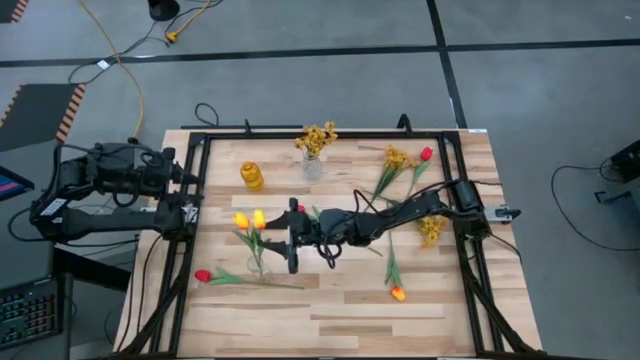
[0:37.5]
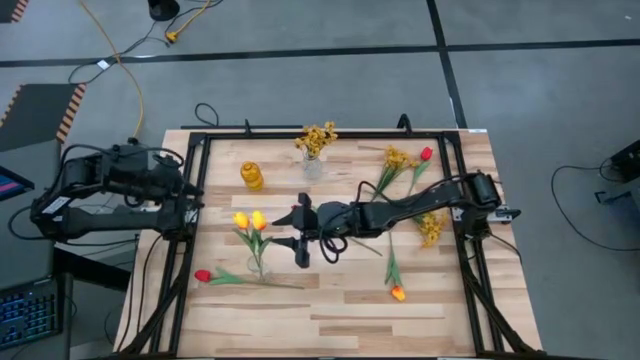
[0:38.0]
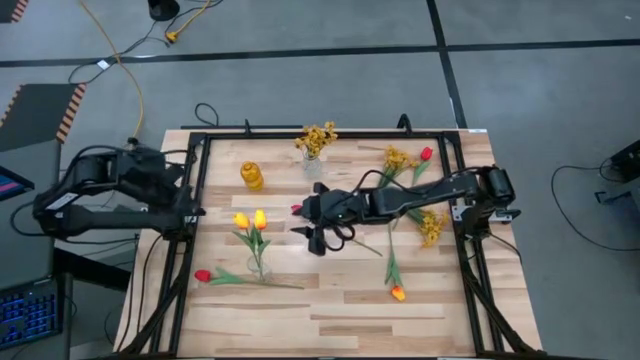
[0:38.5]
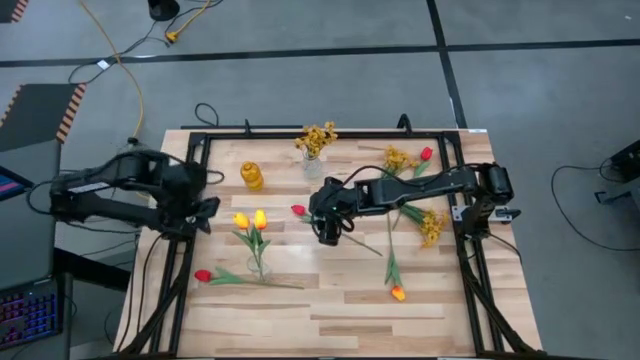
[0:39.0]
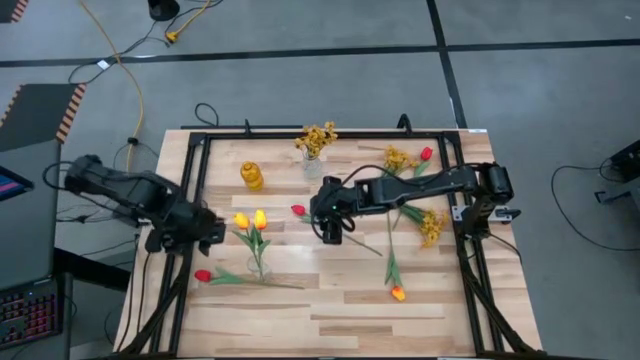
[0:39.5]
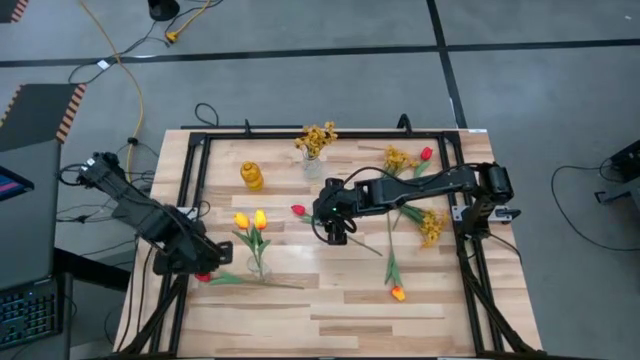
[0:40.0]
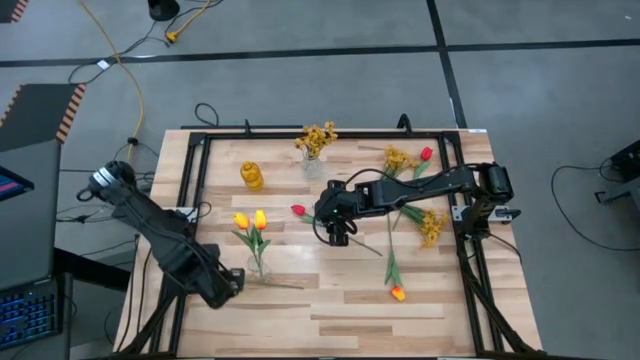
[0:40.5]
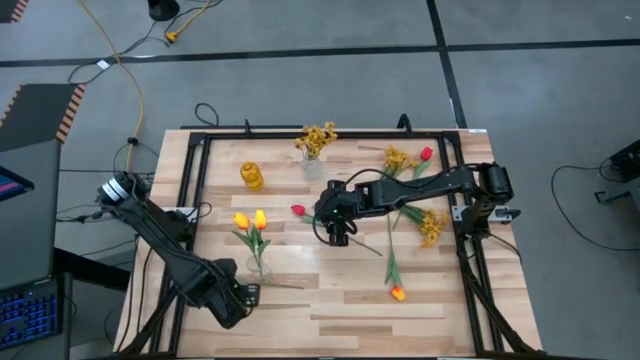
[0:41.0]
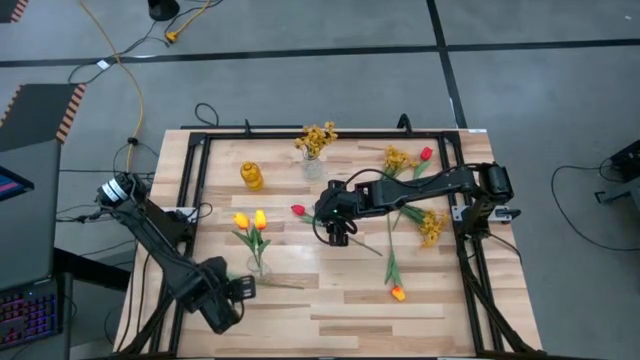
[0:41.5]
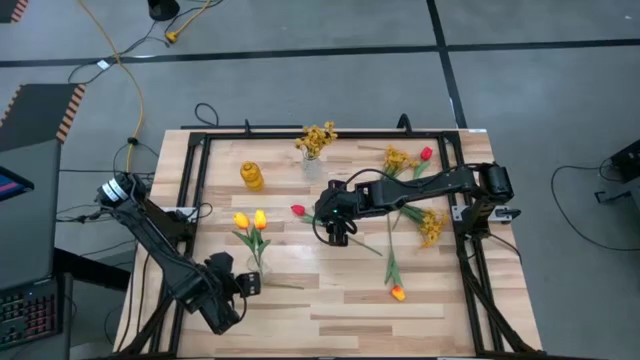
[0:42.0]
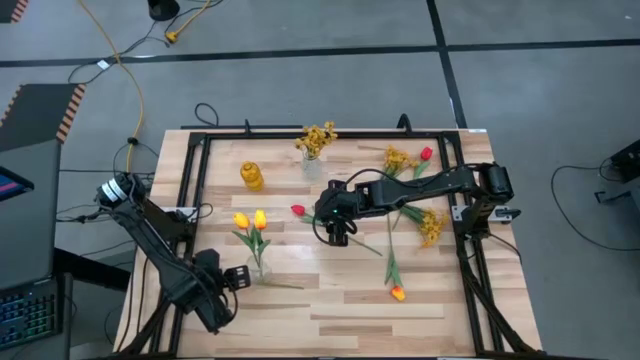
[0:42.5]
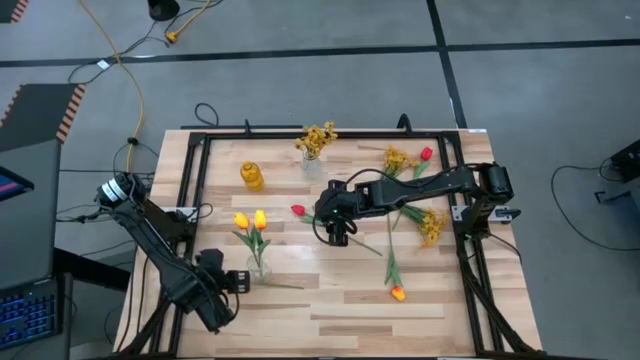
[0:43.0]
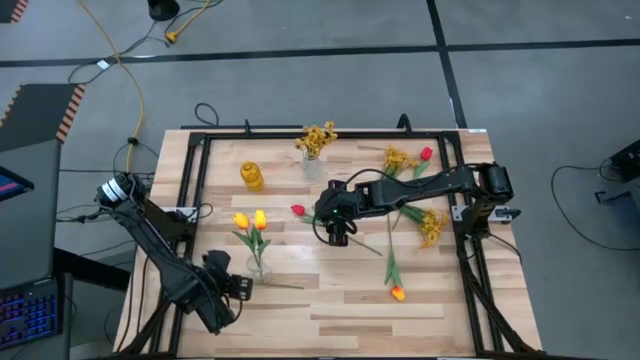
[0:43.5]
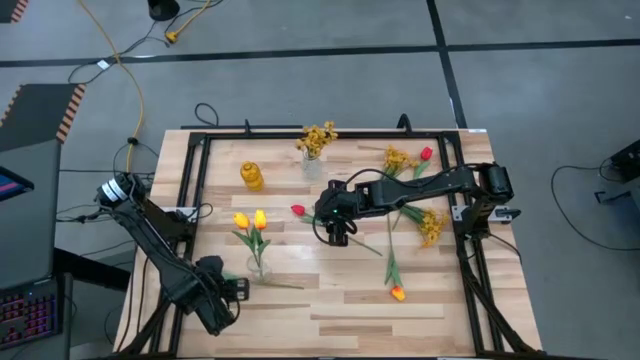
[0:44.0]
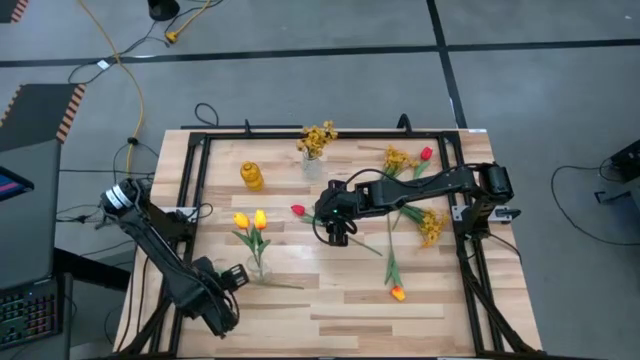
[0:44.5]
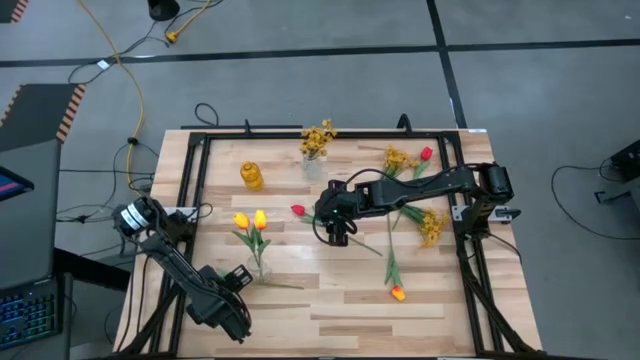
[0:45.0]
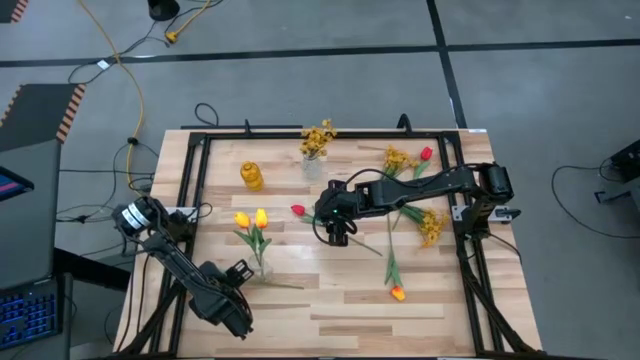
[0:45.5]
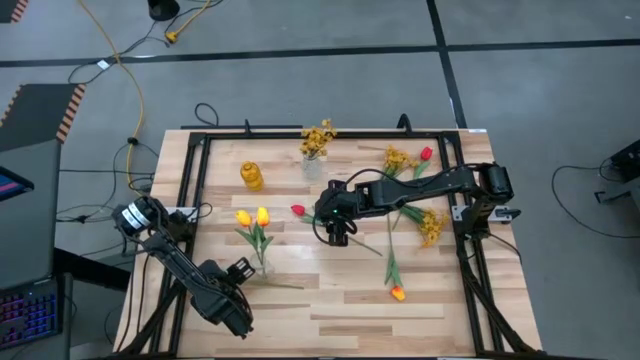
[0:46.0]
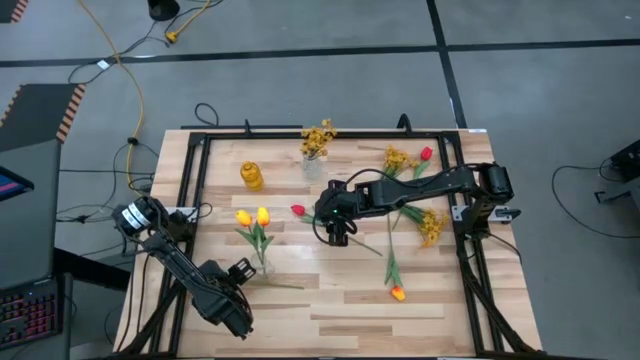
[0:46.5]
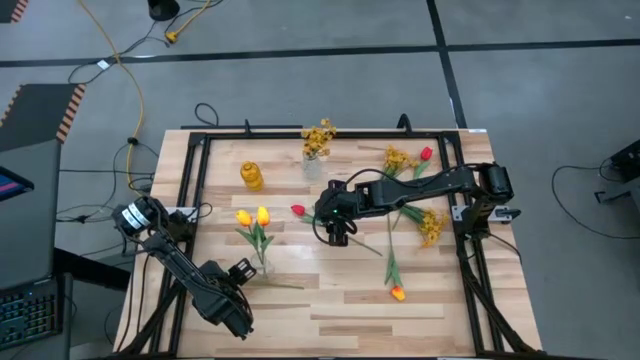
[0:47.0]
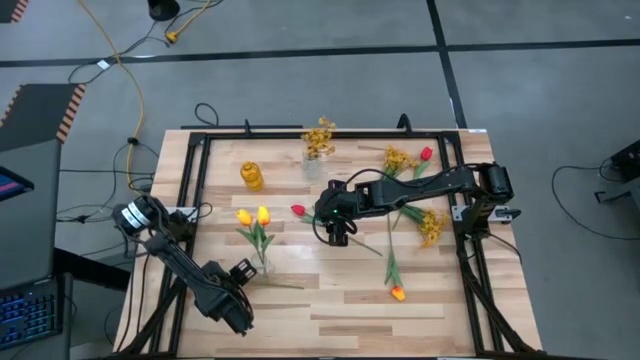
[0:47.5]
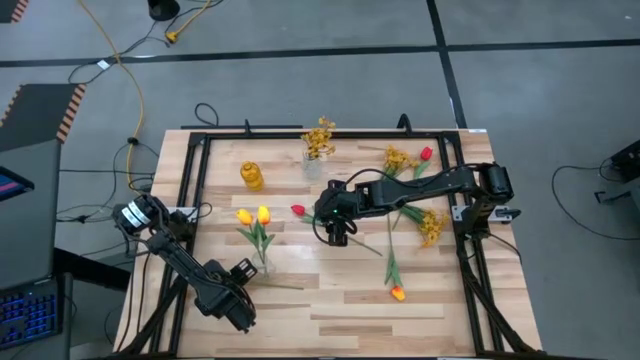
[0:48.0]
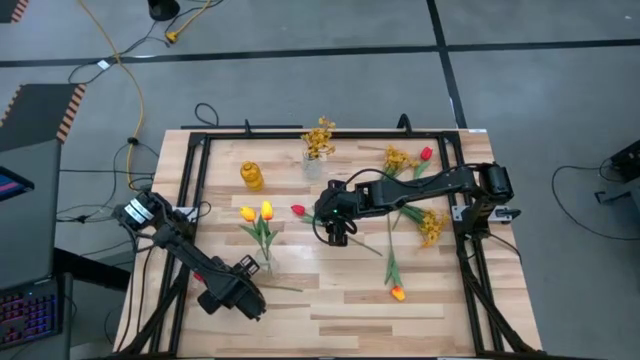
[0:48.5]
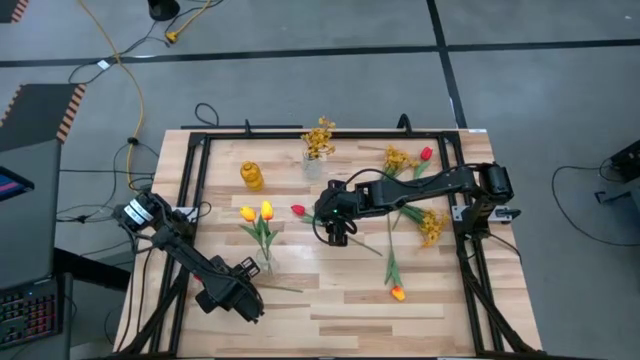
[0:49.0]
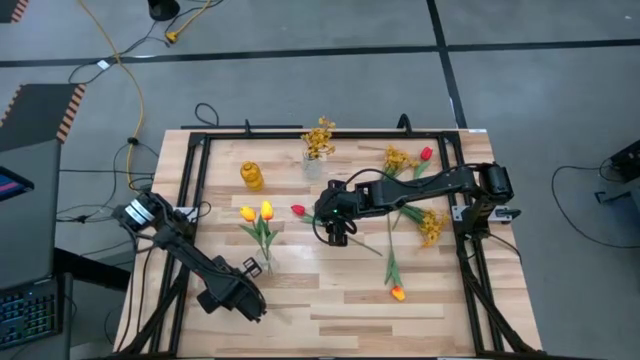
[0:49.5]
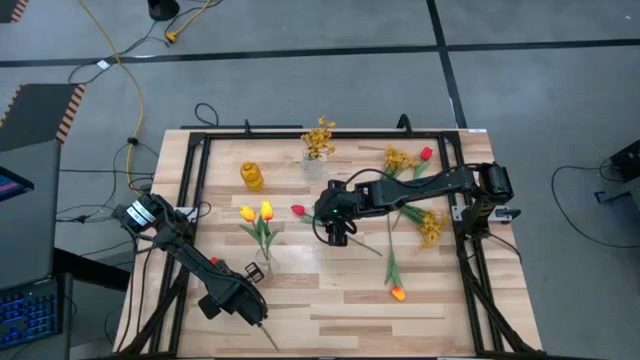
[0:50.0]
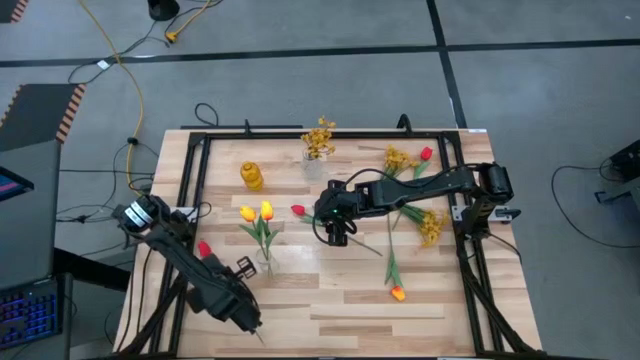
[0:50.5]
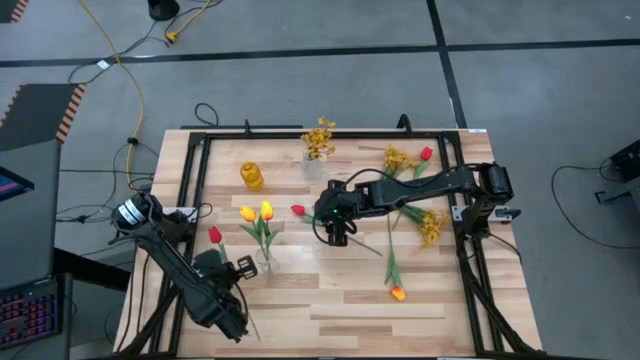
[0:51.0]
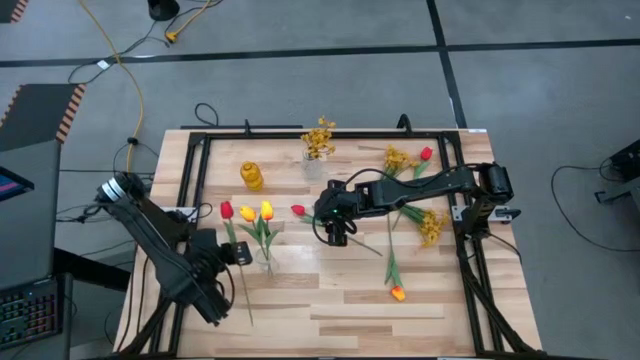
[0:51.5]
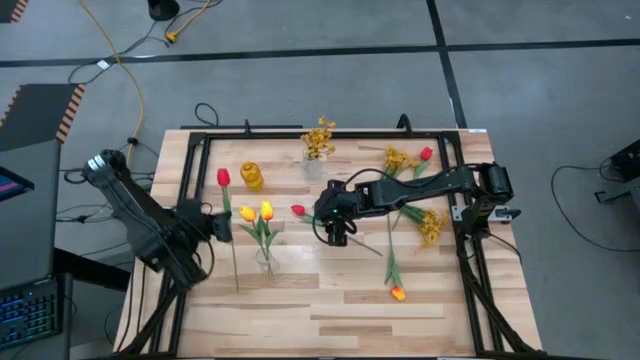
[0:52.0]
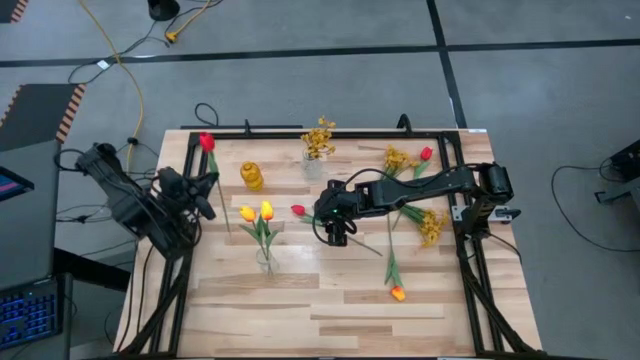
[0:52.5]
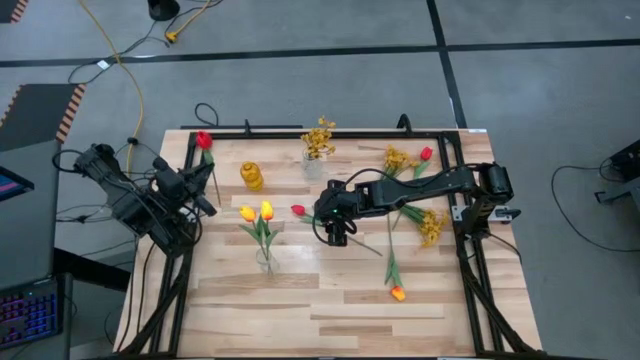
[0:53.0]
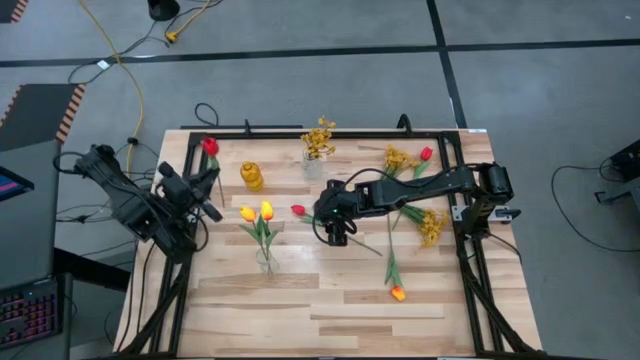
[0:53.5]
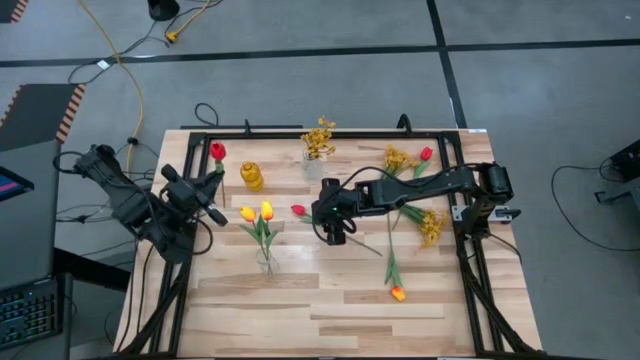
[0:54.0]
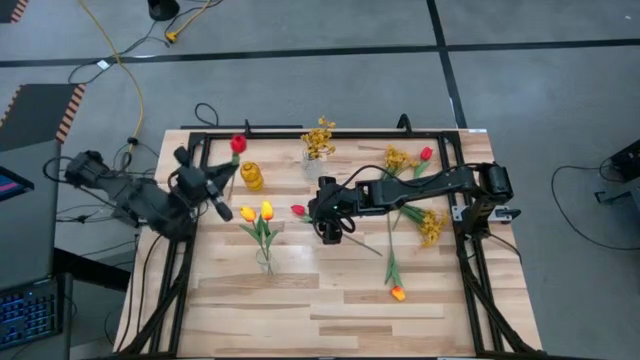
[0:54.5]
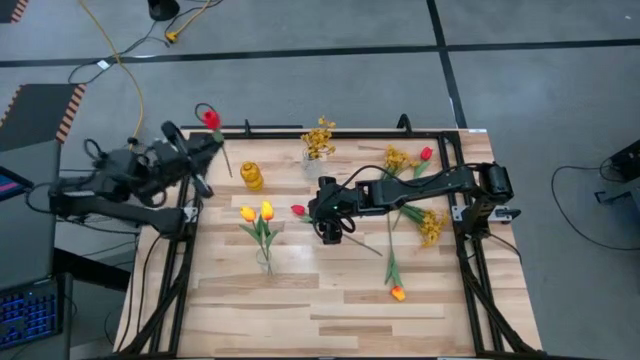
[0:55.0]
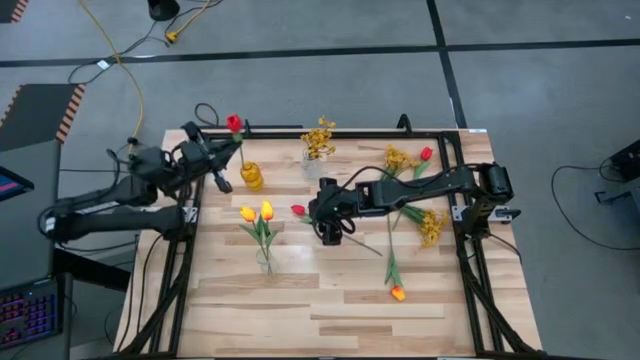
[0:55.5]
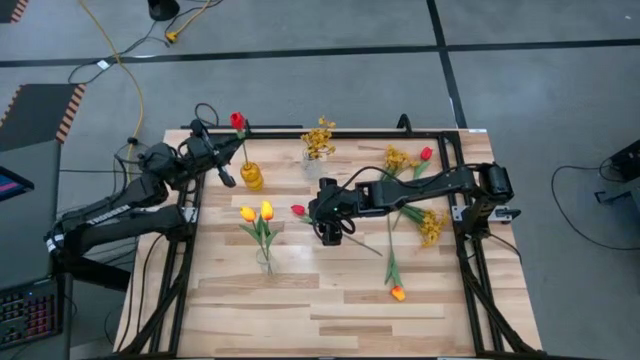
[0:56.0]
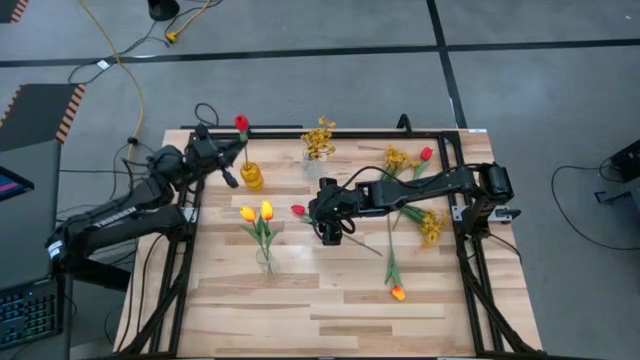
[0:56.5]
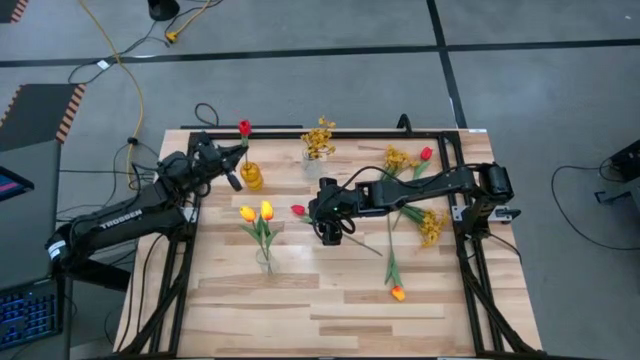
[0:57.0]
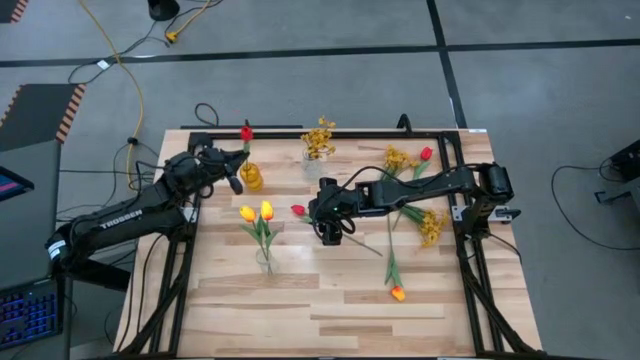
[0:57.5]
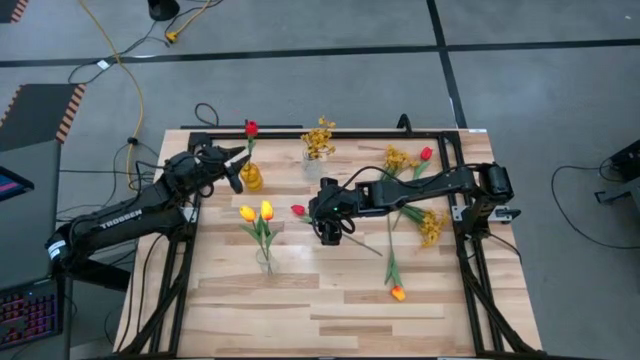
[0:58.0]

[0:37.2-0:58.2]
Task: Sort flowers into vase by color
Put the bottom red flower into the yellow vase

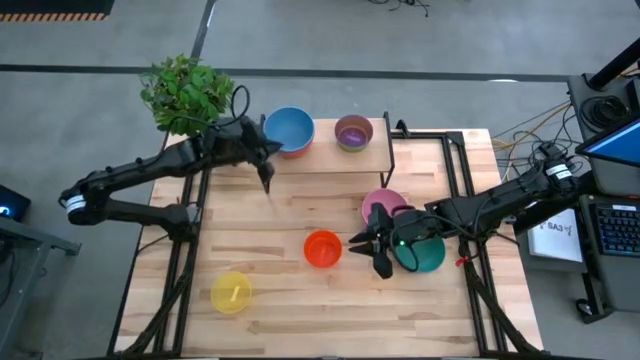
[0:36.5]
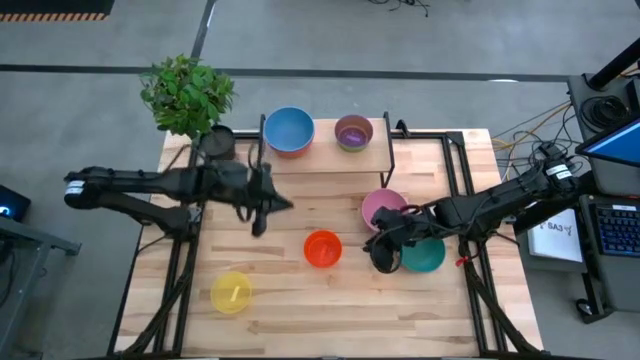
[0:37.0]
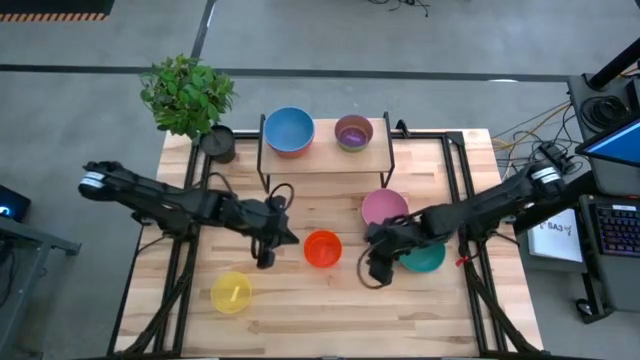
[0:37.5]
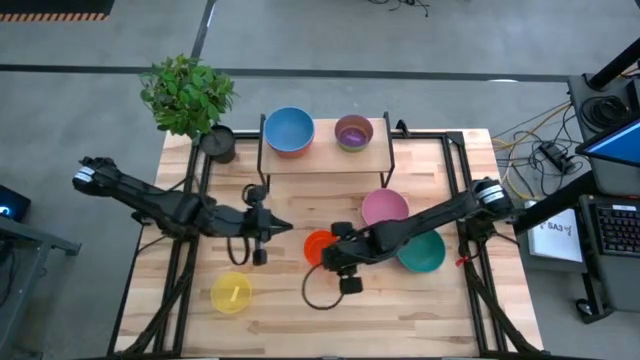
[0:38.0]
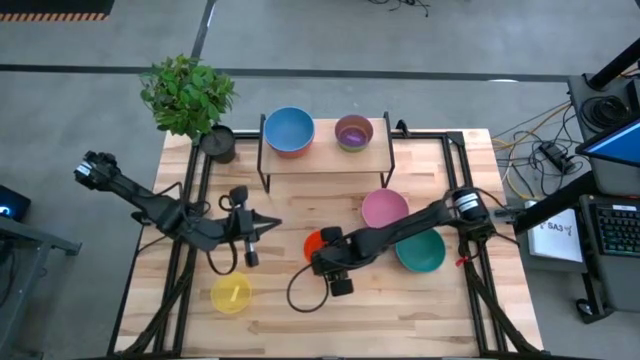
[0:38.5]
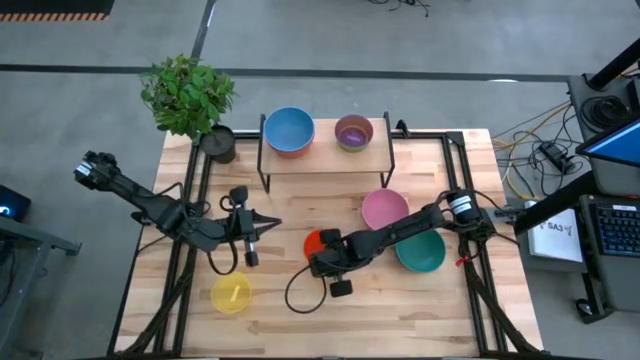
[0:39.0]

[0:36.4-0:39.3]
Task: Place and stack bowls onto a shelf
Stack the small orange bowl on top of the small violet bowl on the shelf
